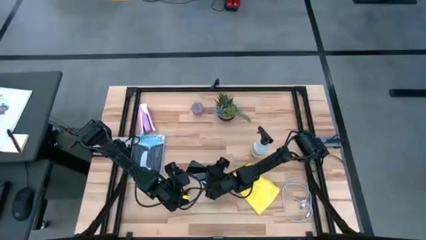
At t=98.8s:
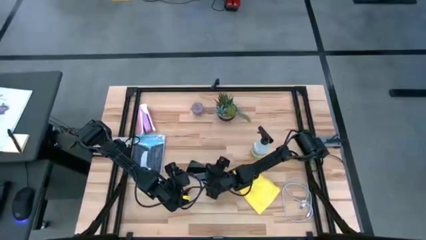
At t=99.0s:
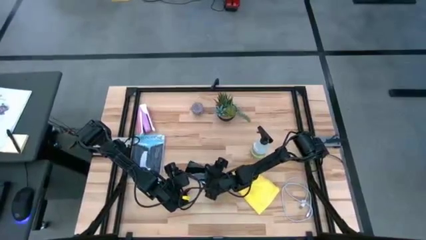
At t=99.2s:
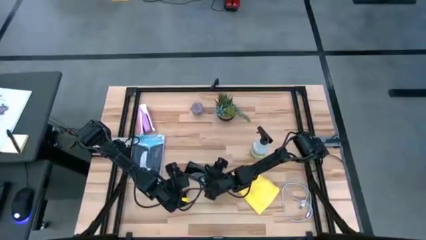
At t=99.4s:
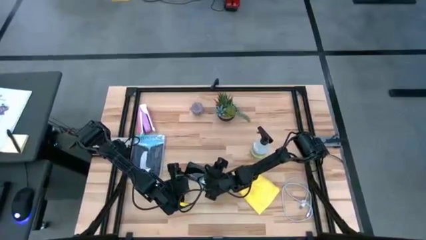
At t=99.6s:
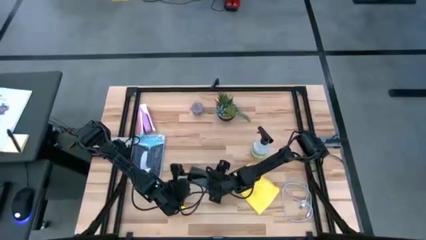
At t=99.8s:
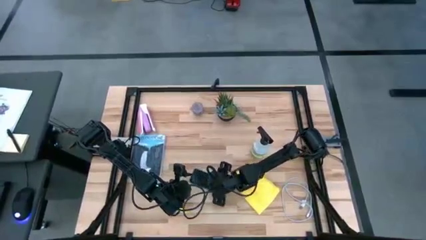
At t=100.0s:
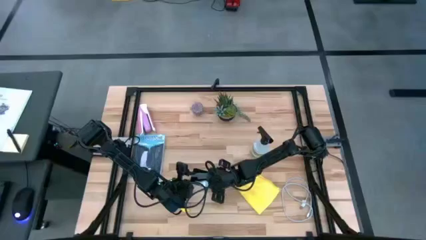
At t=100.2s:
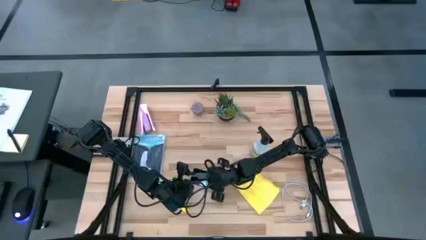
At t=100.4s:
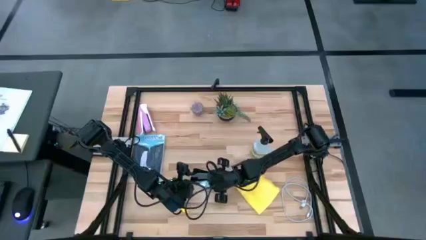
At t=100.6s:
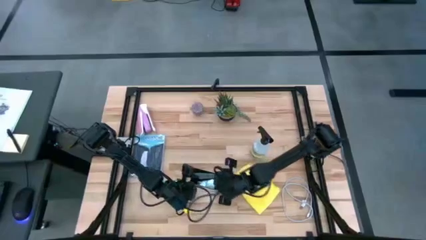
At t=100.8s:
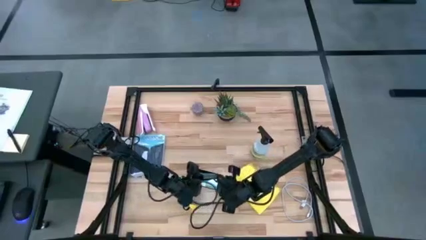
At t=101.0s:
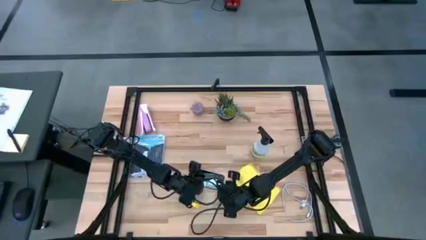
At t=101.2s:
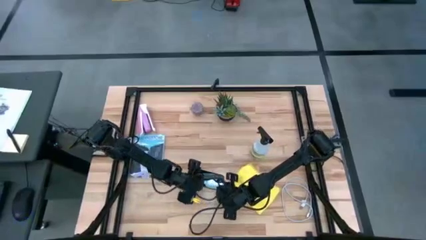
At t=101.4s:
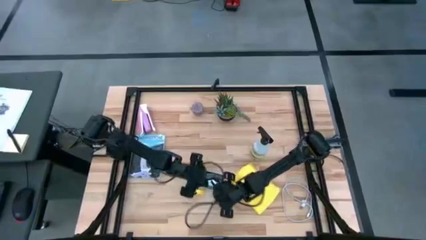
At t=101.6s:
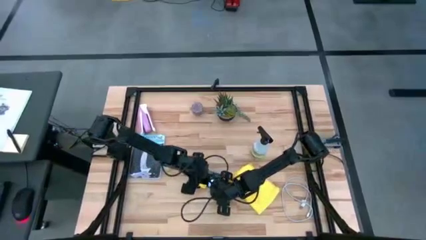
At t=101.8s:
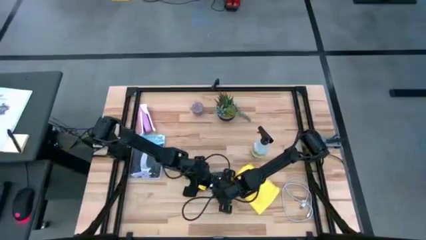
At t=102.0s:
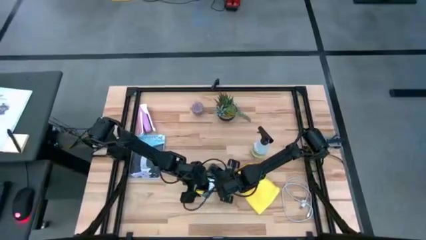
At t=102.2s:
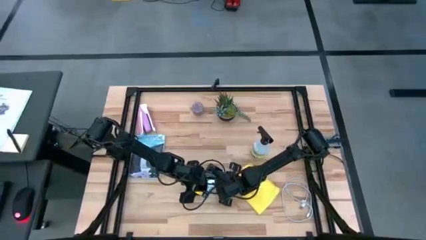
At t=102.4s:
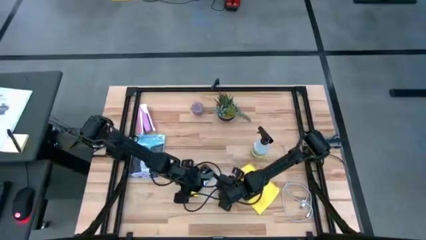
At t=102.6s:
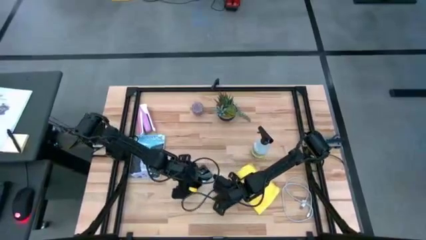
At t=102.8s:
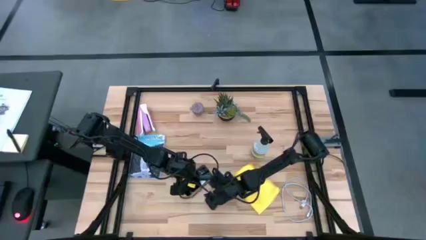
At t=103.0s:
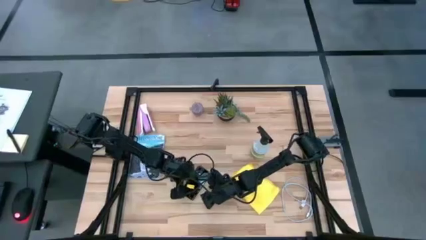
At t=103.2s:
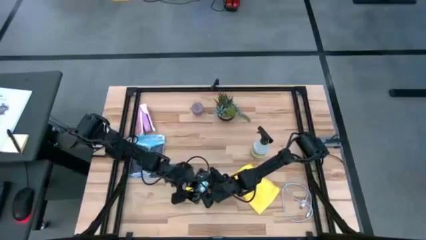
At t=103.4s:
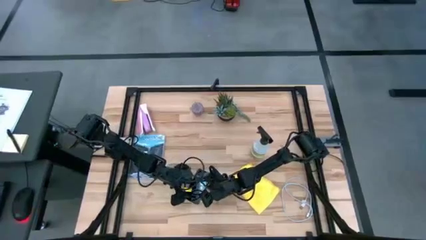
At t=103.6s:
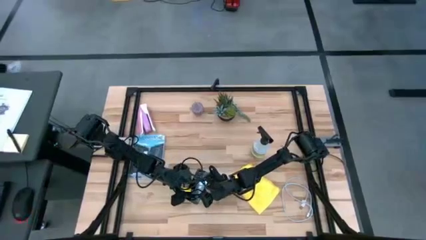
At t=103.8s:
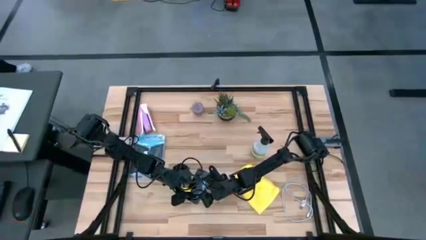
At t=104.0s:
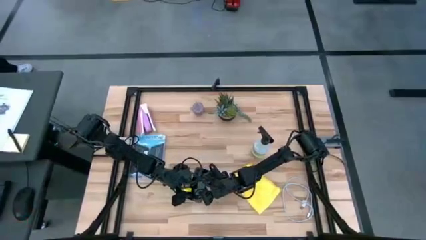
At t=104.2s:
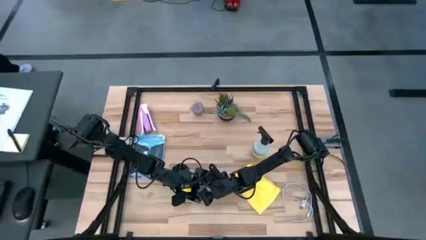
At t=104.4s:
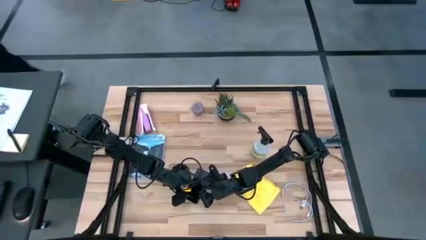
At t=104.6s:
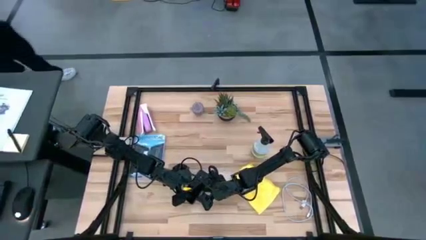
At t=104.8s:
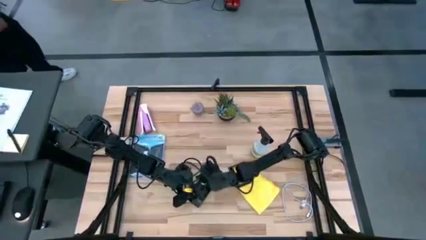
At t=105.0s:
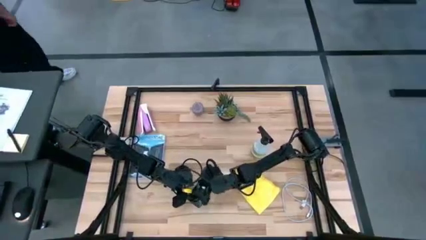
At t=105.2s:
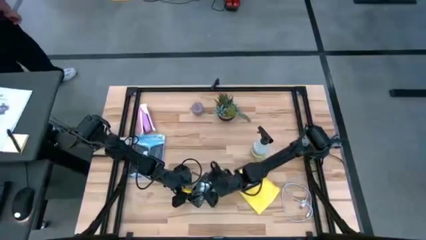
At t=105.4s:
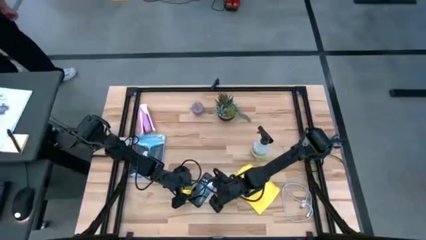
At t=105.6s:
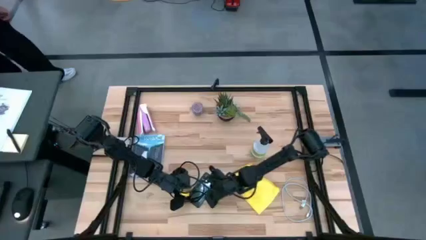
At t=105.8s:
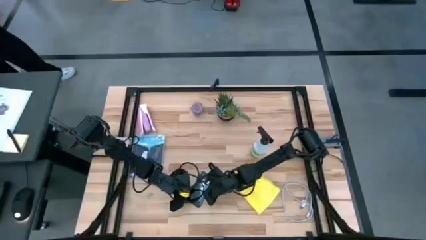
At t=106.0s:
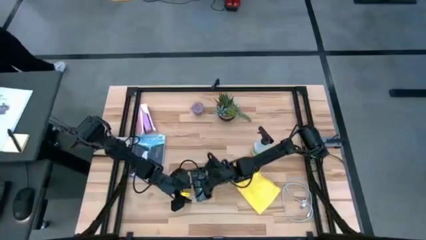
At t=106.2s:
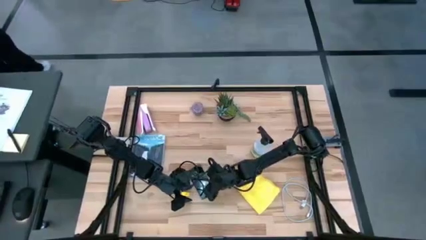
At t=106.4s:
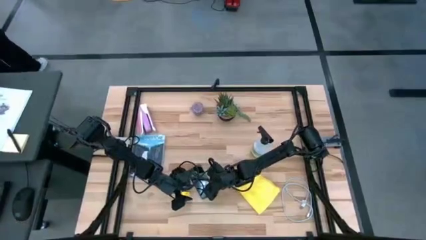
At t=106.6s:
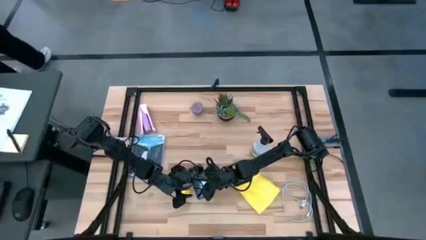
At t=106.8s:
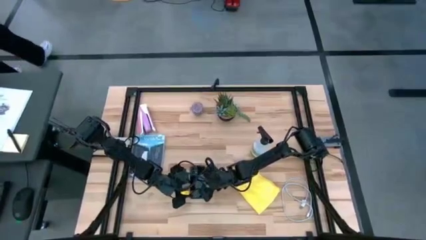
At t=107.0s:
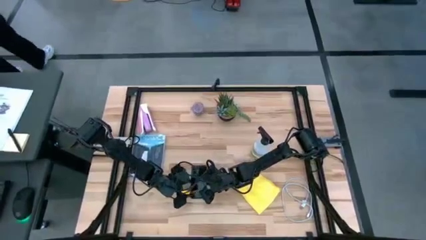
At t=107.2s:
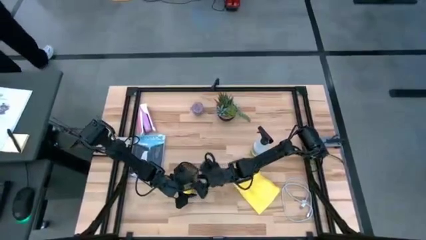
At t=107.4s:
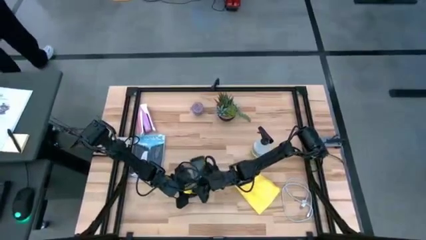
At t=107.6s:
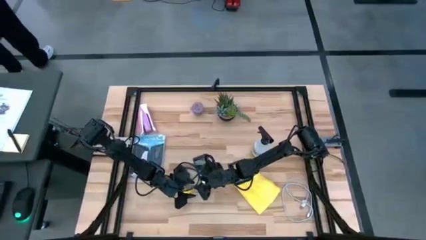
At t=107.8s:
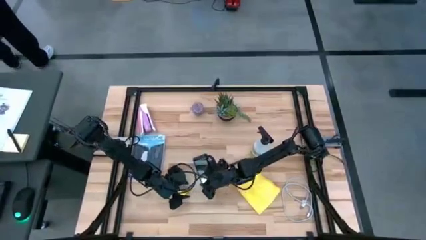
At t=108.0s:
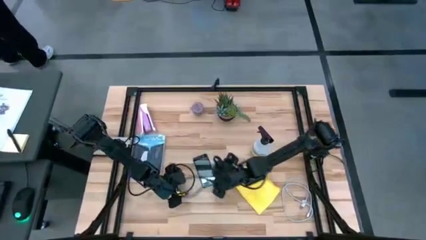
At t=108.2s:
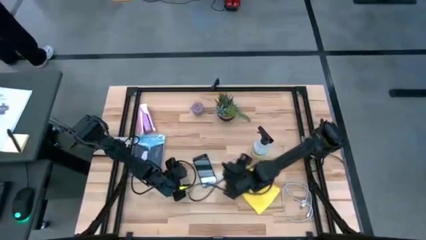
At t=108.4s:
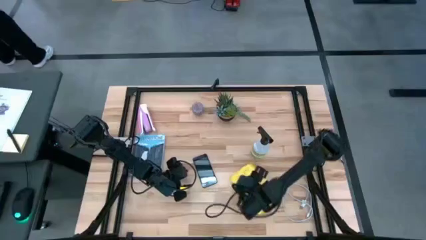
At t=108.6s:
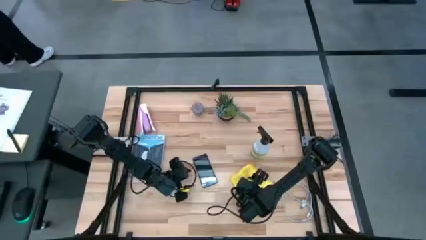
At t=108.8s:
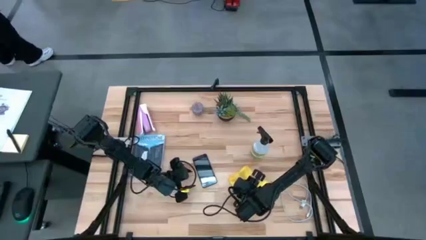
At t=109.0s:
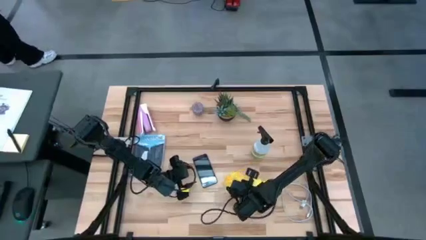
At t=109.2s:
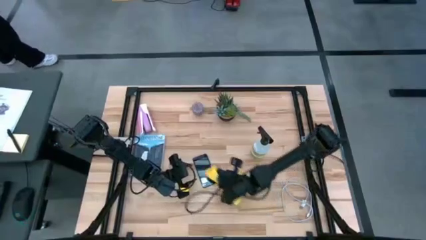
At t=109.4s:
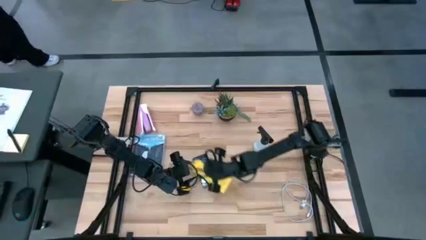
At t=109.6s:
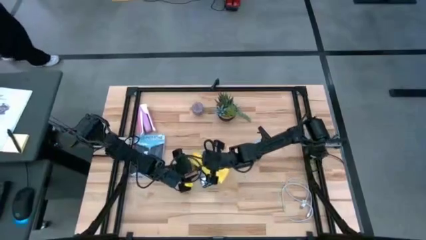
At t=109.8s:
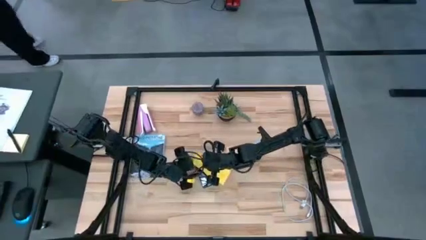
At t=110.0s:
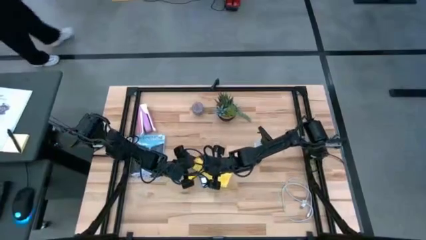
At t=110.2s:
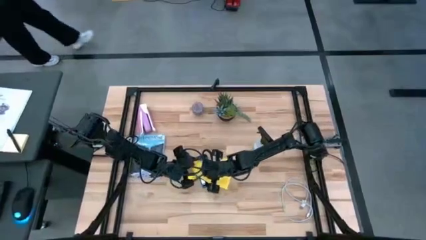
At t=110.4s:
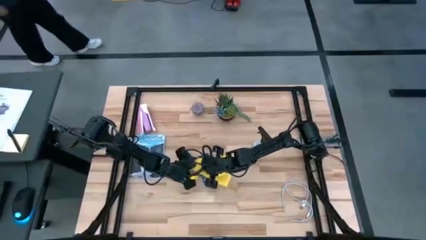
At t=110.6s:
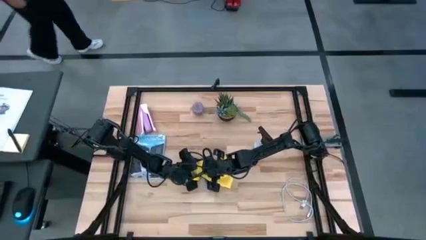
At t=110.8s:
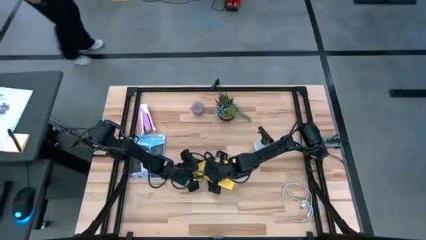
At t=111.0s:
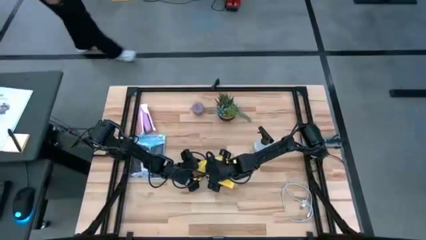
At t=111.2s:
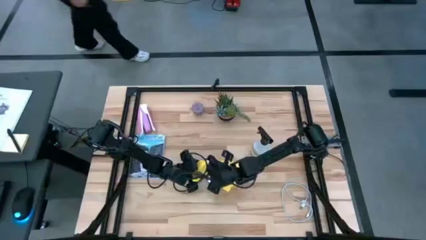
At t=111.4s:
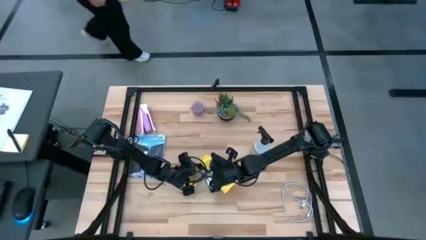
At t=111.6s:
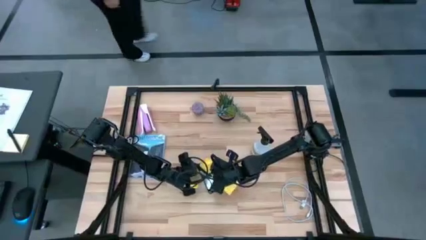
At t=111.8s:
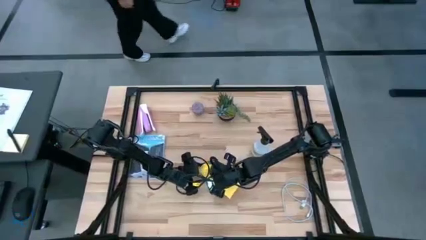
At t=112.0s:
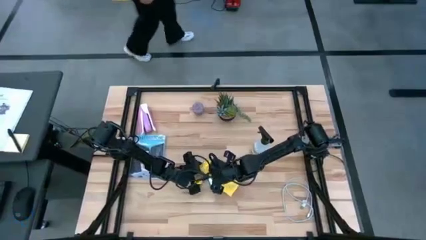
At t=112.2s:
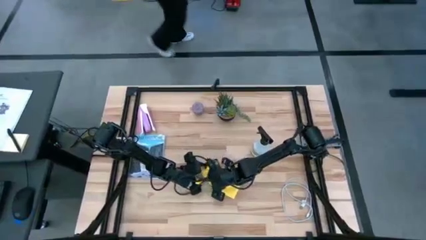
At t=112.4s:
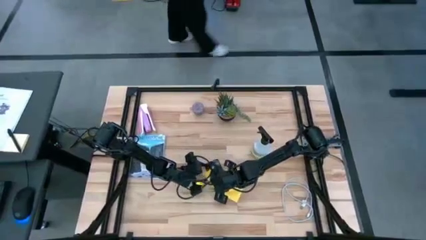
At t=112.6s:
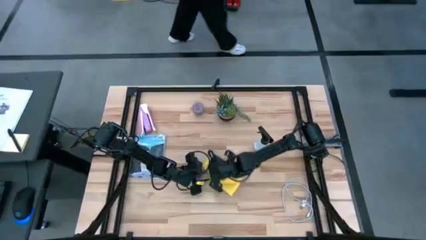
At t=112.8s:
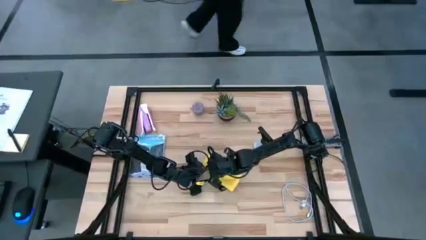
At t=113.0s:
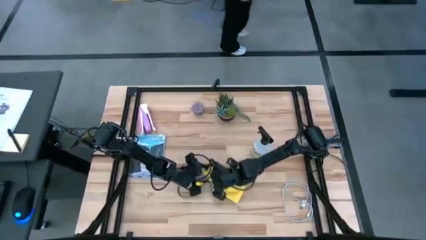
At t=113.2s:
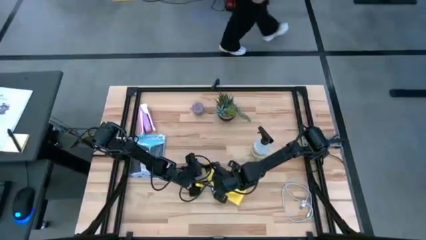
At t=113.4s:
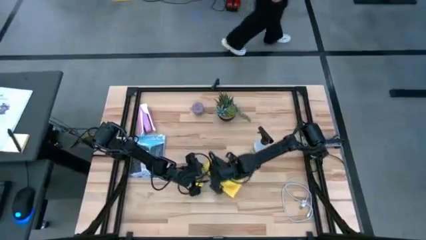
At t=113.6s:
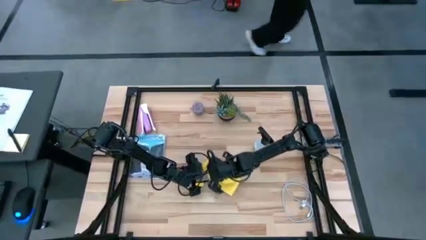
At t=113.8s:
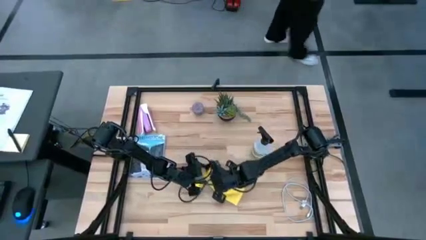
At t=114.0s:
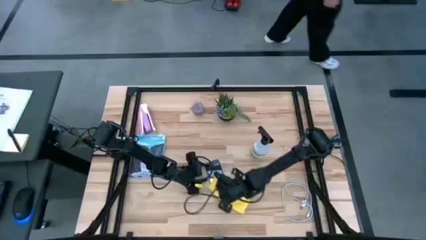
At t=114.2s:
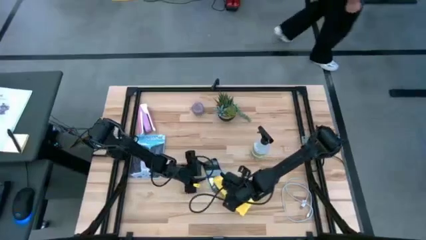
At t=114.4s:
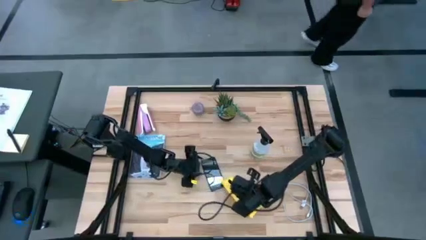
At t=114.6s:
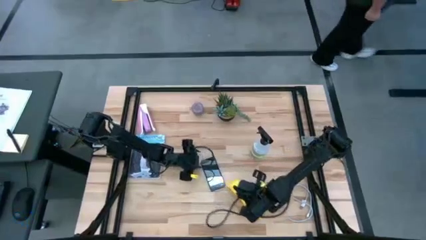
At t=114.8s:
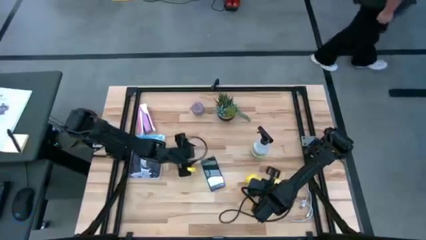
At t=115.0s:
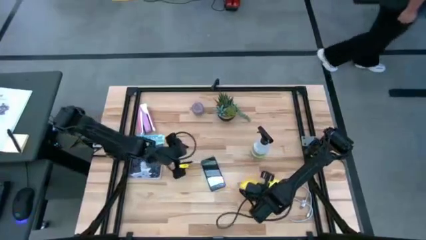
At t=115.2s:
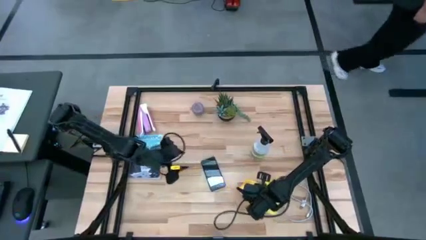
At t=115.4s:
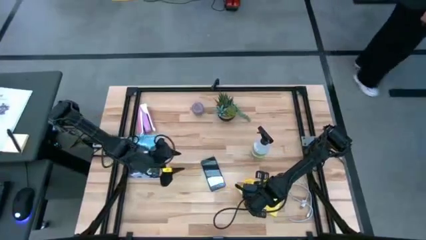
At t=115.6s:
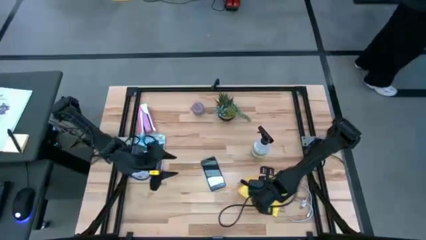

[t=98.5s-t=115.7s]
Task: Apply microfiber cloth
Wipe the cellphone with the microfiber cloth
